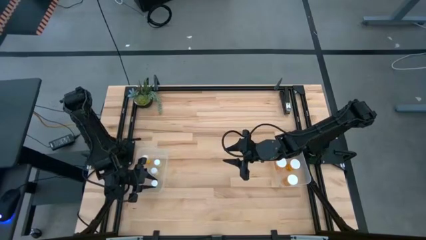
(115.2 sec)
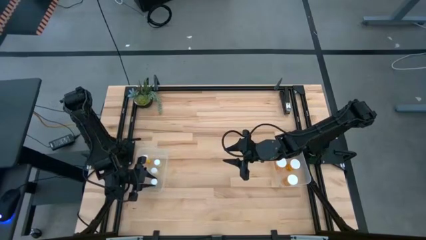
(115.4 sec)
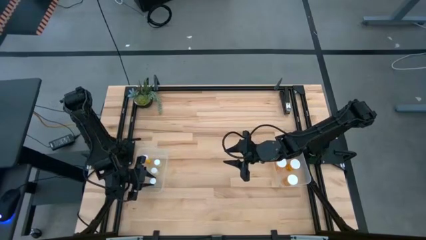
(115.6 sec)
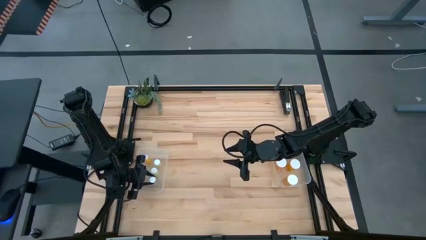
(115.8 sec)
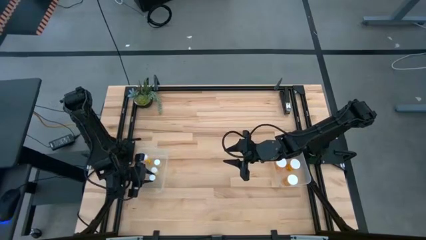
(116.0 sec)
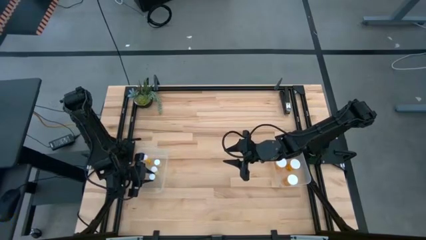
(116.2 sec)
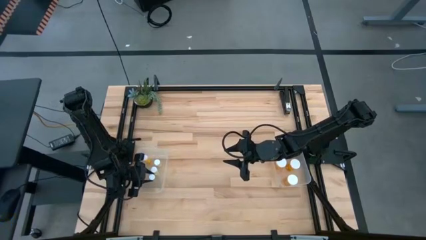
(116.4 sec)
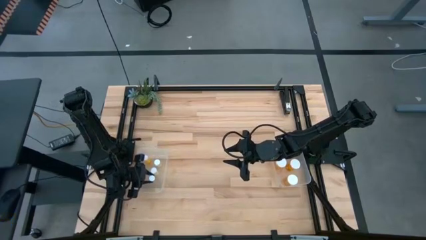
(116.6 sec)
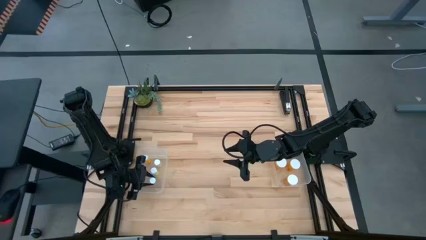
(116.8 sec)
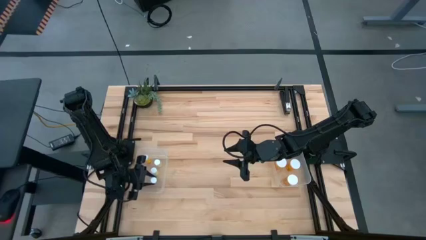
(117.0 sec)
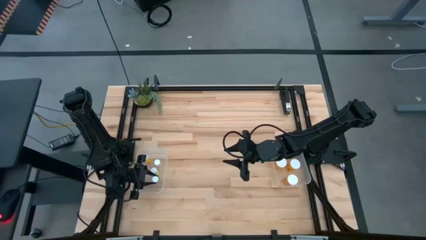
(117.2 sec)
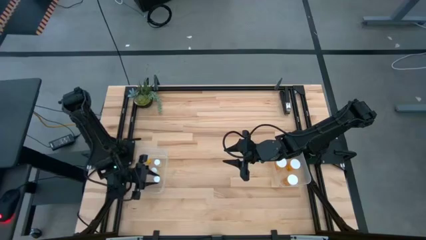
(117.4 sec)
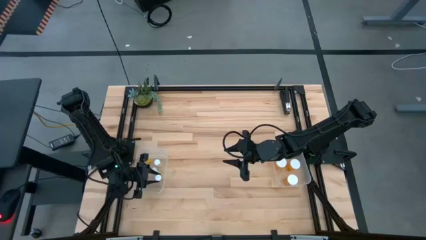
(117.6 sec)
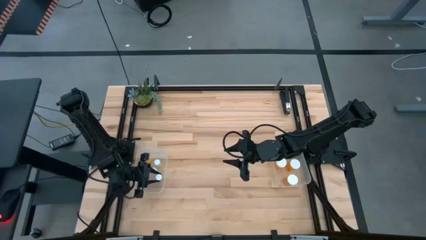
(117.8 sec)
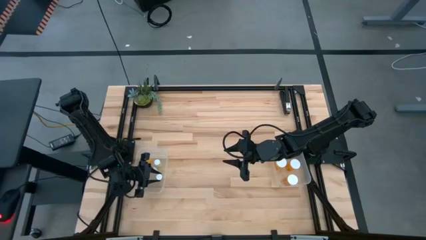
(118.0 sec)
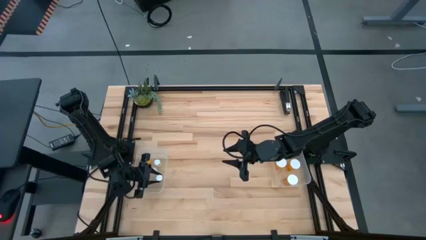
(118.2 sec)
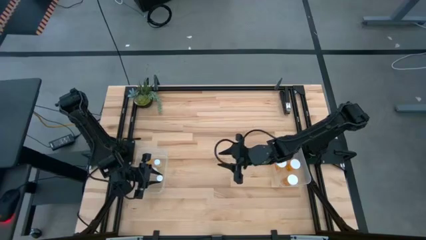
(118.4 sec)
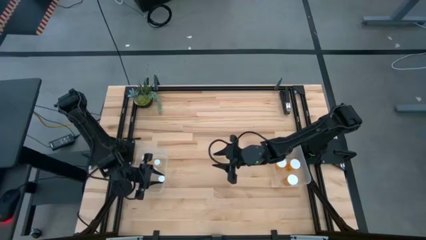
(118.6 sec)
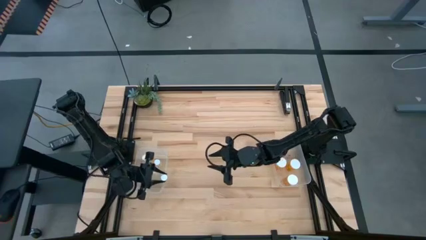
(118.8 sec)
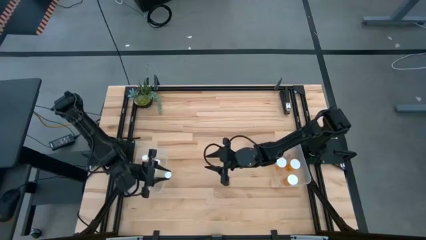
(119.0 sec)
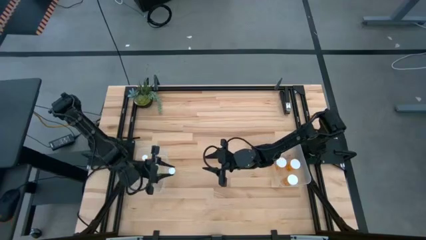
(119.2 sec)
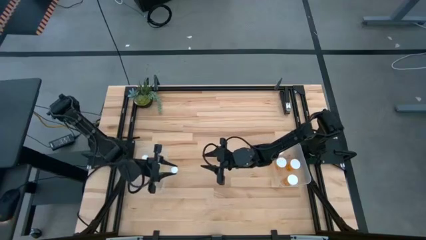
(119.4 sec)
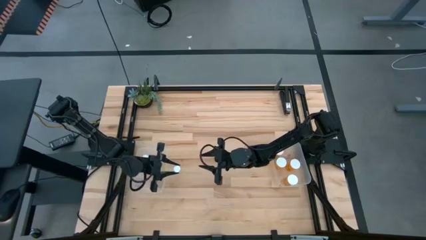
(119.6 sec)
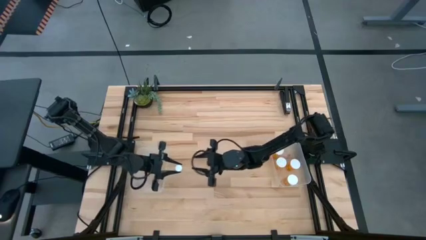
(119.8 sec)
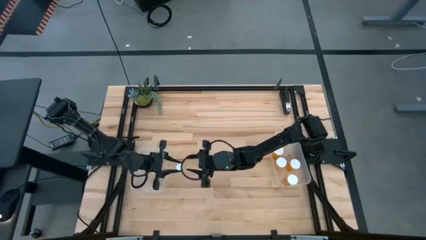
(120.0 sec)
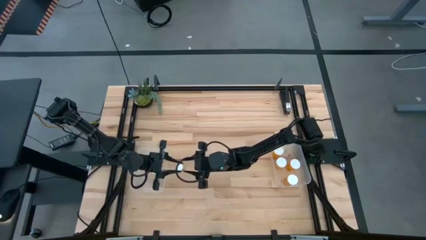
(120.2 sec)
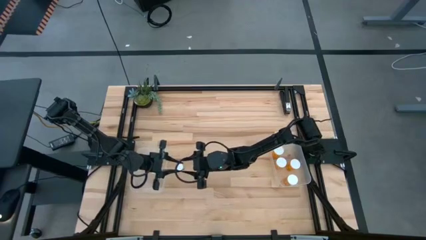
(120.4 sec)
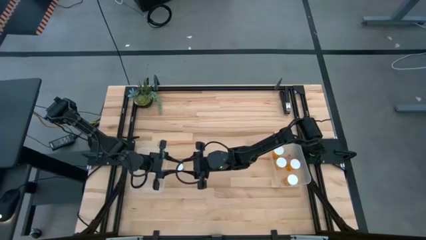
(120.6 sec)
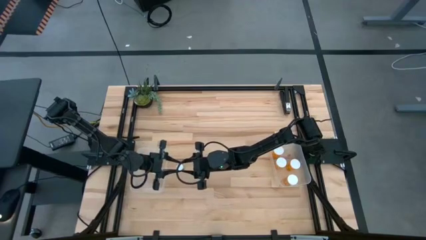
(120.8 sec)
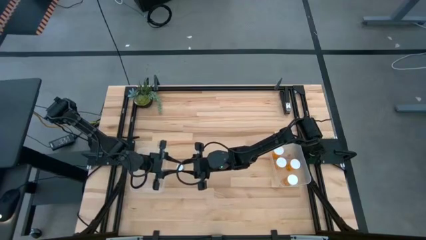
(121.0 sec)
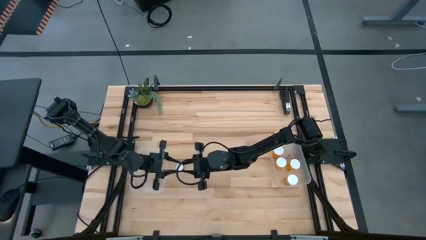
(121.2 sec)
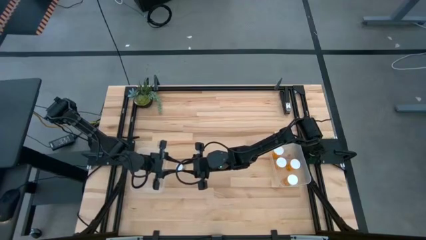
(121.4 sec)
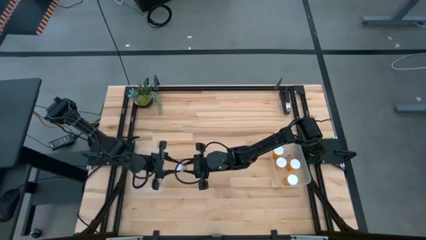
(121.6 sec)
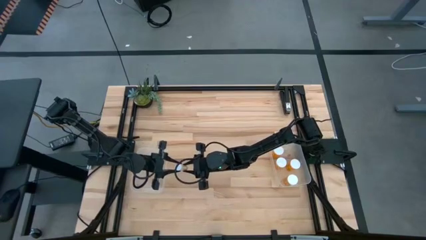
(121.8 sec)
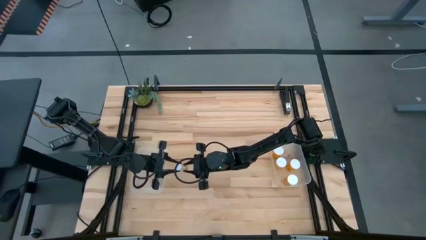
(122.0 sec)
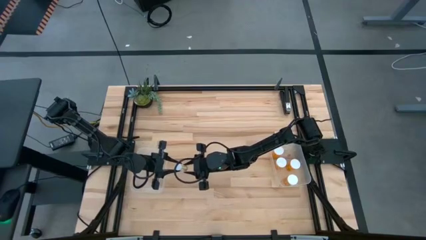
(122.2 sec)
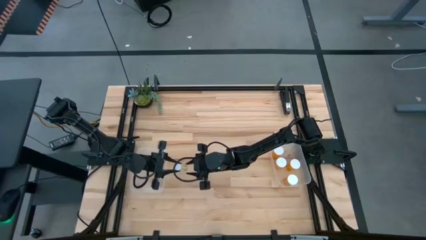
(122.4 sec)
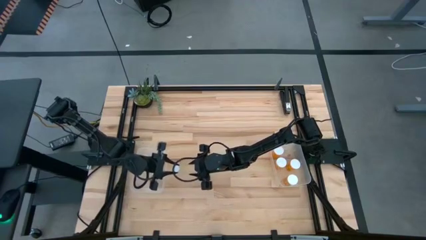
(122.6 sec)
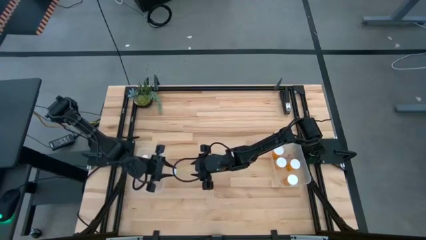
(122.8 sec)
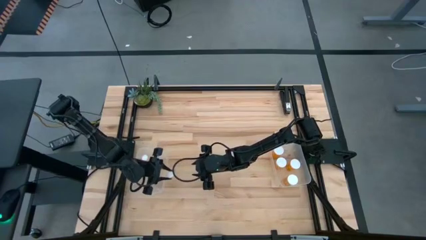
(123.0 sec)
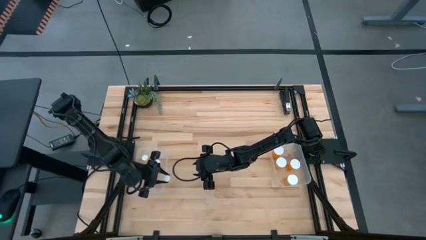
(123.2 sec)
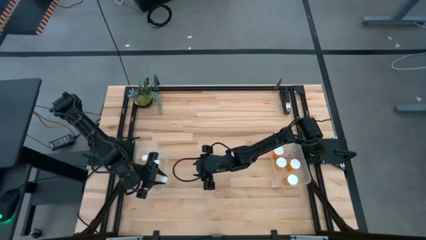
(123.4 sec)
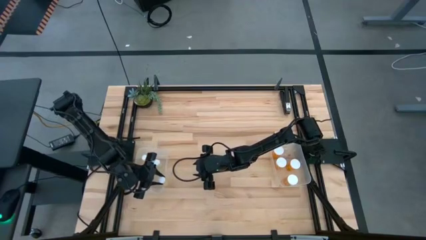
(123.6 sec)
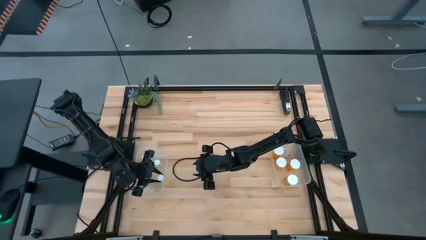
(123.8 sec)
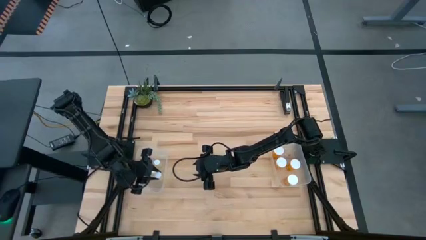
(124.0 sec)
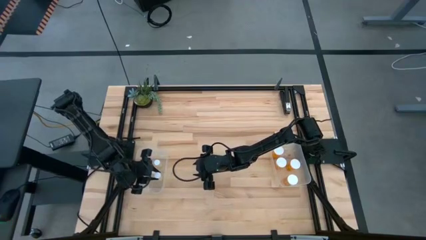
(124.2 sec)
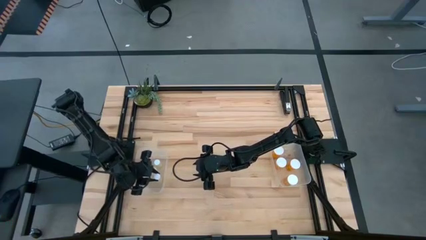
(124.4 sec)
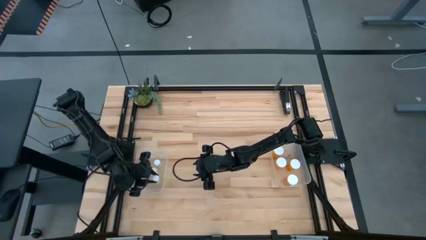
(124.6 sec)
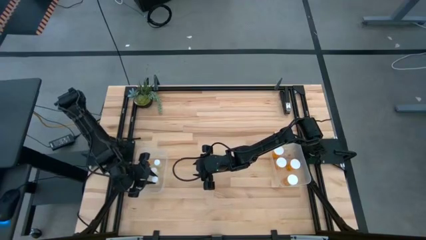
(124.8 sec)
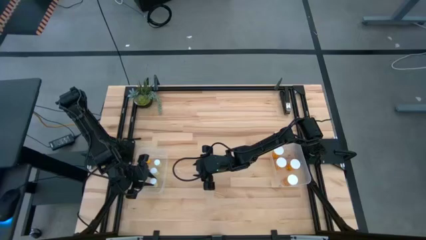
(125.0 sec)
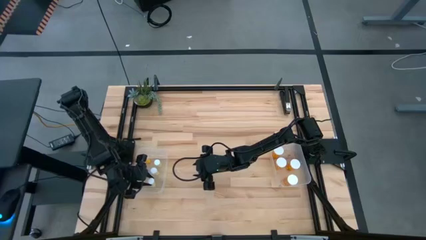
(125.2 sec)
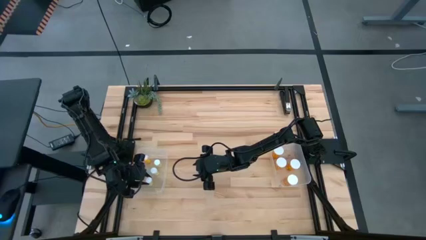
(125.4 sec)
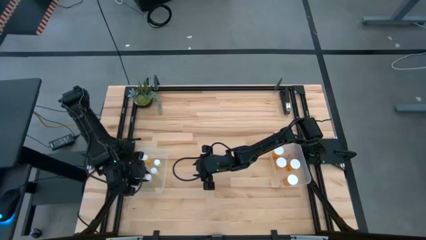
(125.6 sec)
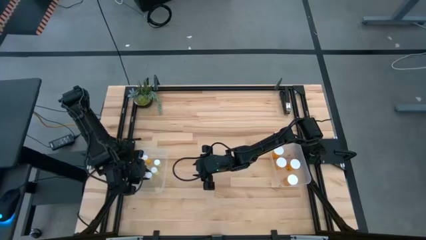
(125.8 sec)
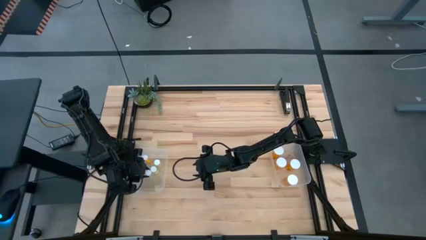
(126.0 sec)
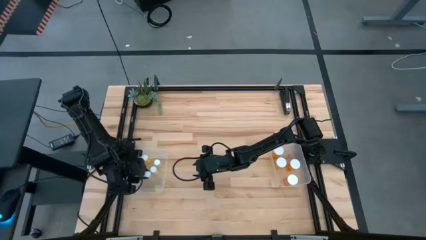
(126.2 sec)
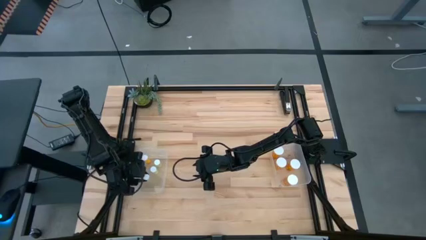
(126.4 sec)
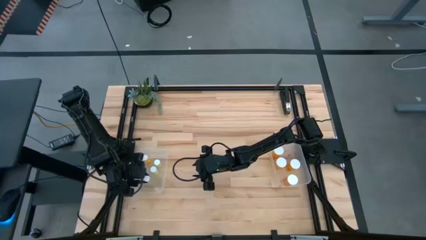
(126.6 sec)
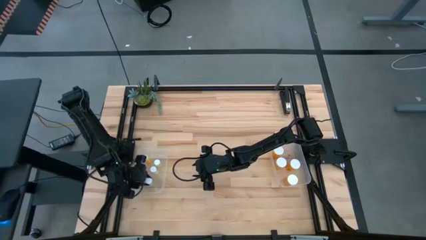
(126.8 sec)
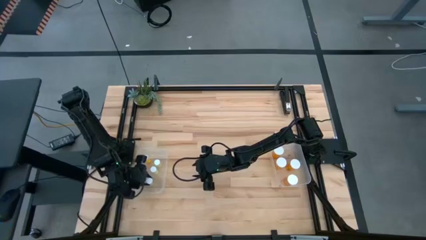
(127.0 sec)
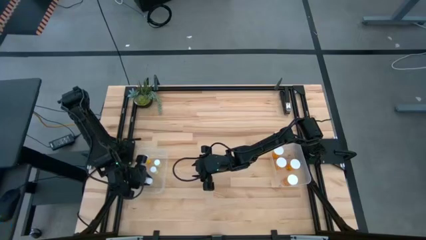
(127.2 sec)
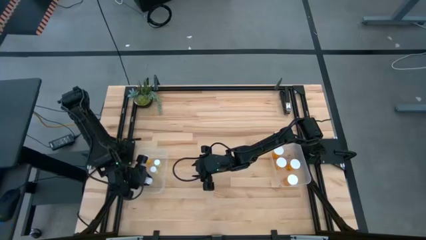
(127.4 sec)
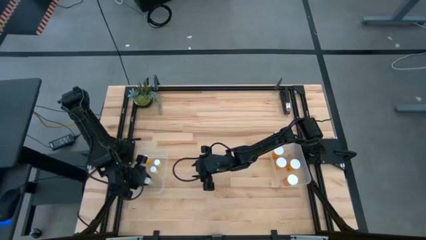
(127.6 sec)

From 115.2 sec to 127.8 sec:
Task: Pick and place medicine bottles into bin by pill shape (circle, oval)
Put the small light yellow pill bottle into the left transparent bin
